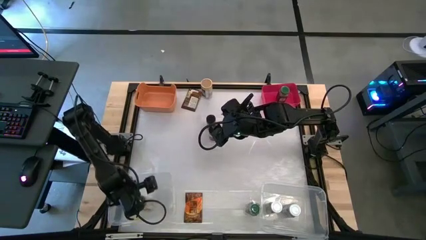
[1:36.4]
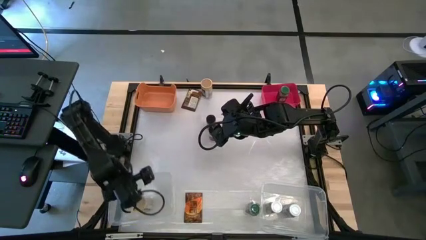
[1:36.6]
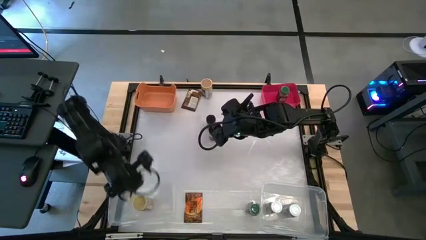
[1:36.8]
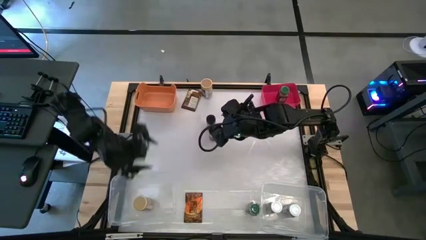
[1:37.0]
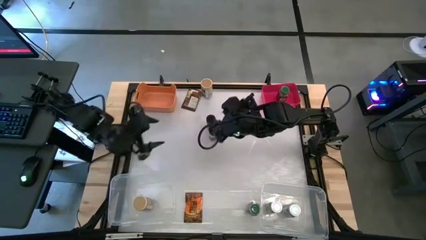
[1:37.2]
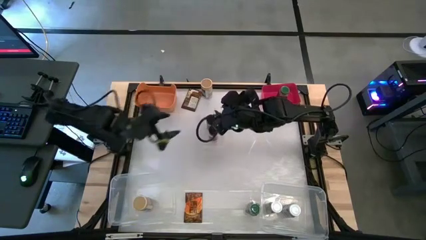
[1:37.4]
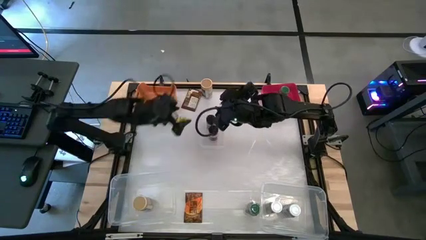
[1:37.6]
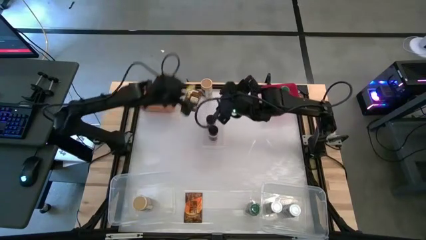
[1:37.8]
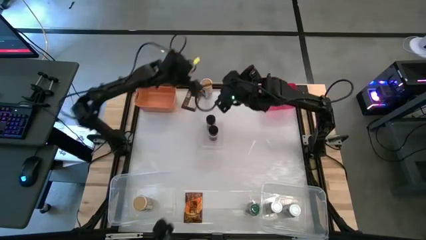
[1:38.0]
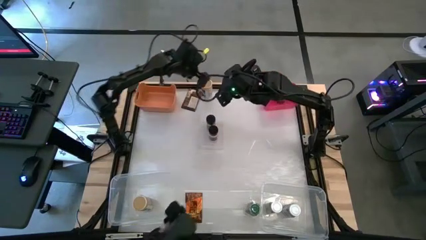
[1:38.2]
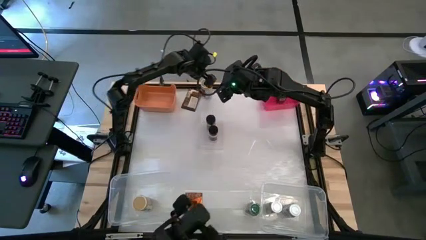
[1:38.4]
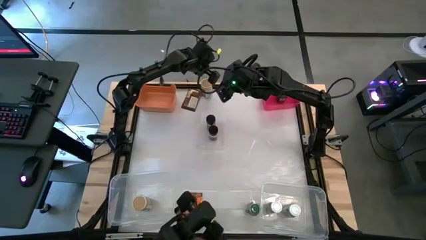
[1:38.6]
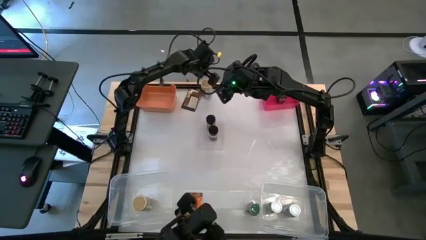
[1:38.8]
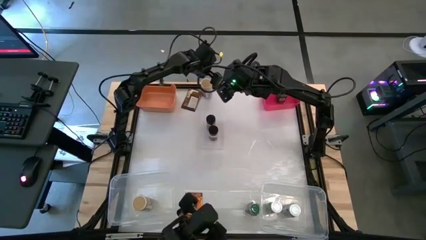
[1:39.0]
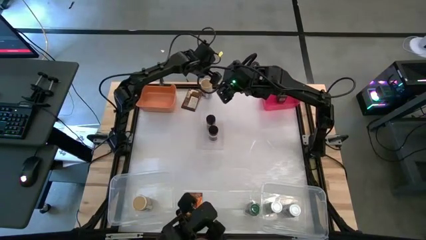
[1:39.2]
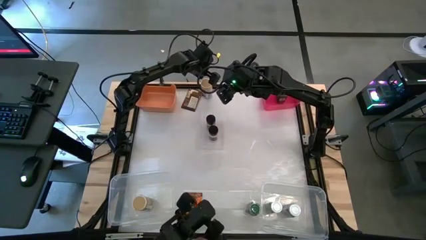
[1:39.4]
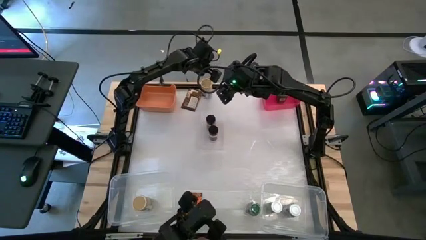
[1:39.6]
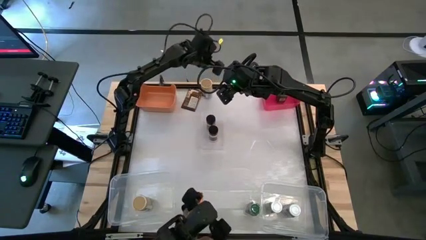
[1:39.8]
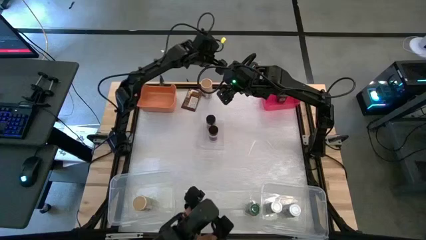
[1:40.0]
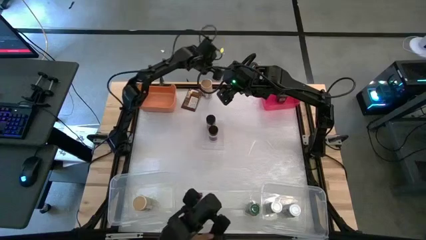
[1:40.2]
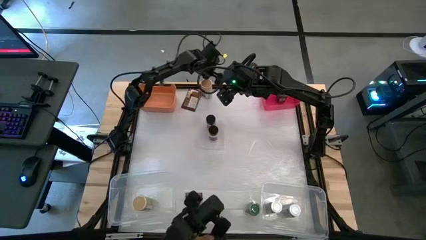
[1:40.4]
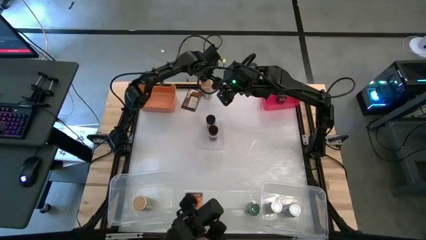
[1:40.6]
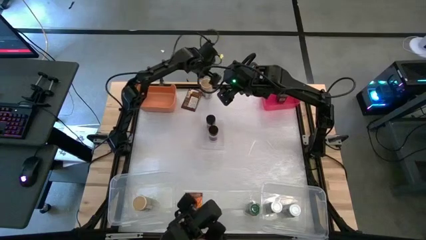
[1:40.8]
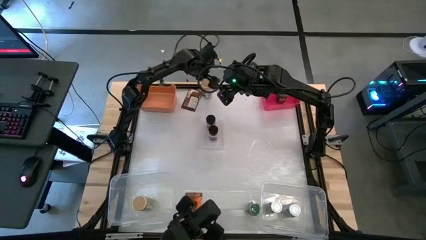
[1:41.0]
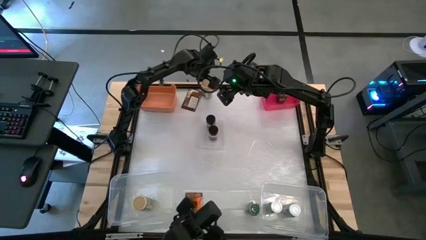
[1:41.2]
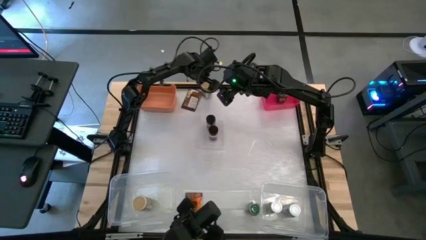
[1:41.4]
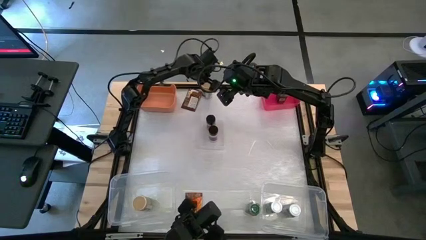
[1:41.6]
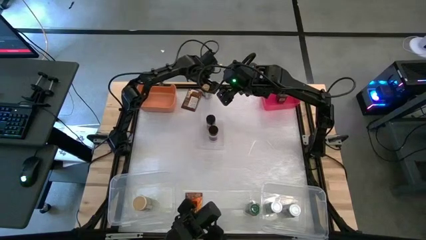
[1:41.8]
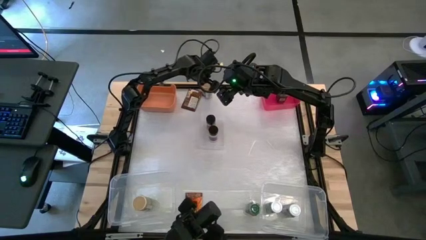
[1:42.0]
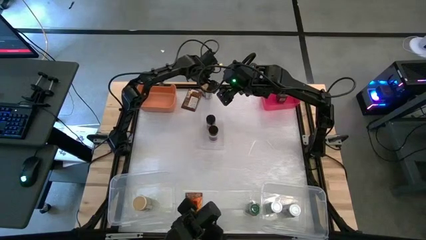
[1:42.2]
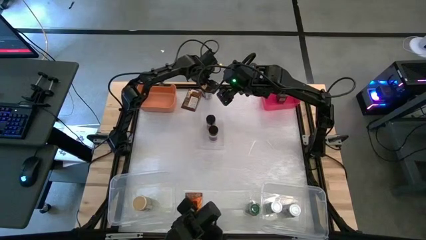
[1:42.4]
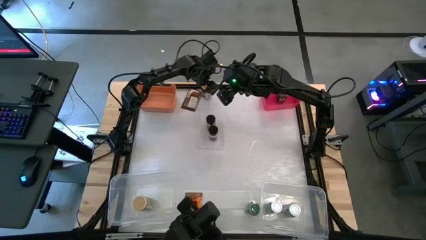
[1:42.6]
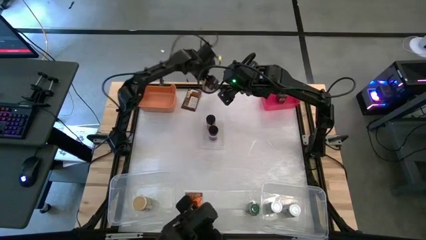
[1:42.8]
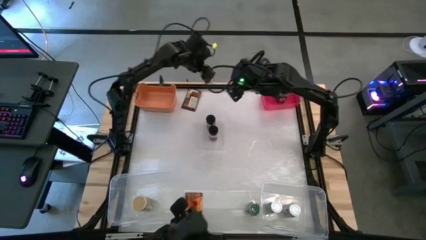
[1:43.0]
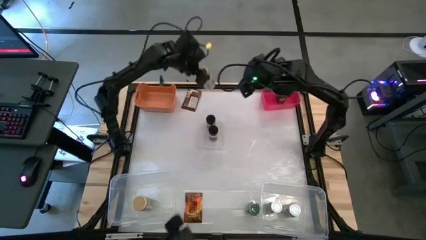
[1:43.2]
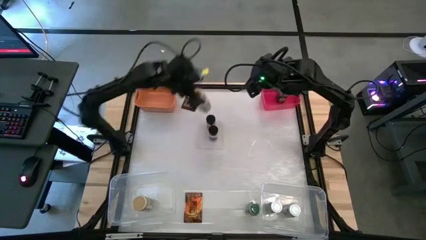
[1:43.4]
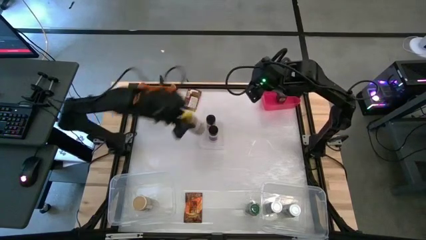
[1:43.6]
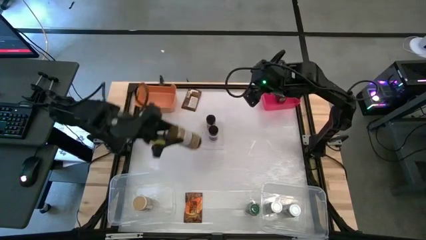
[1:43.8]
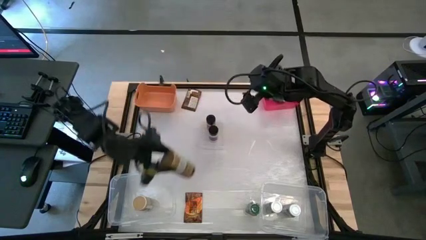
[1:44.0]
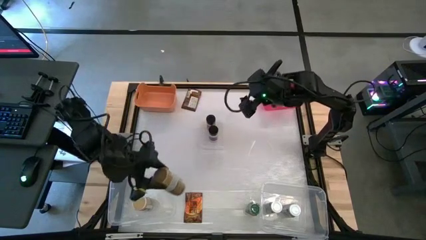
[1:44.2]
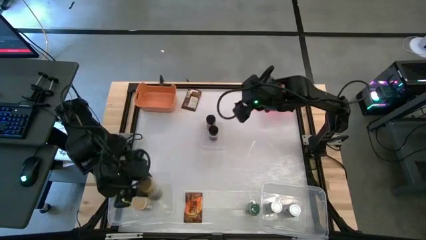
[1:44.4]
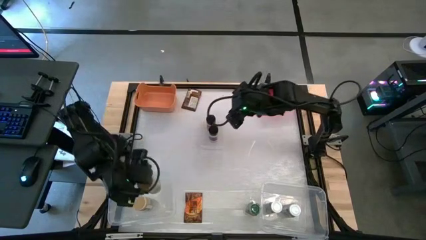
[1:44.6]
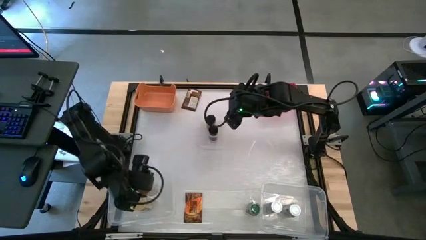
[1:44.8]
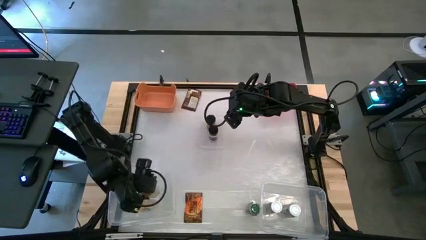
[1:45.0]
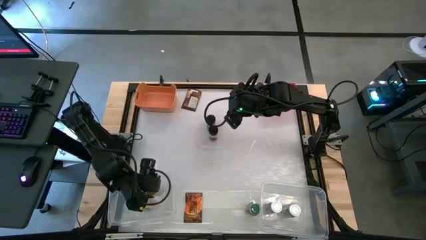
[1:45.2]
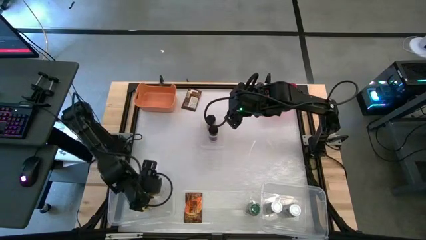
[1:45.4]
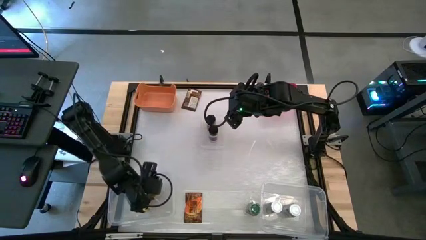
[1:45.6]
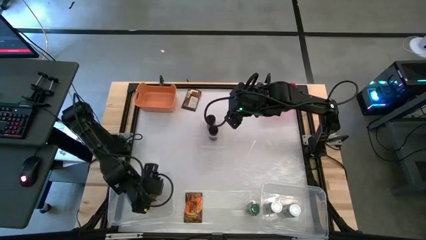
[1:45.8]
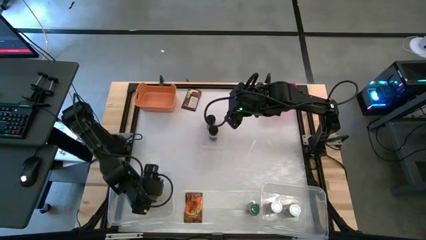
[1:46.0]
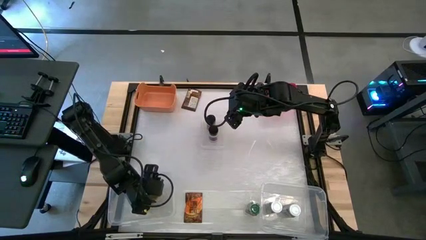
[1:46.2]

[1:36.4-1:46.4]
Task: Sort spices by type
Put the gold seasoning bottle into the left transparent bin

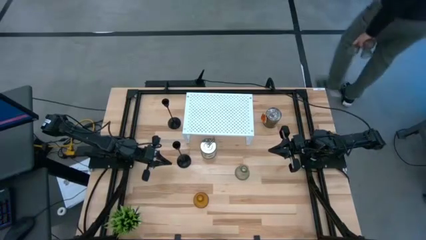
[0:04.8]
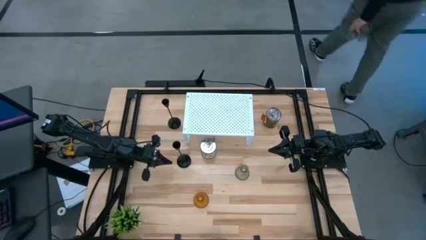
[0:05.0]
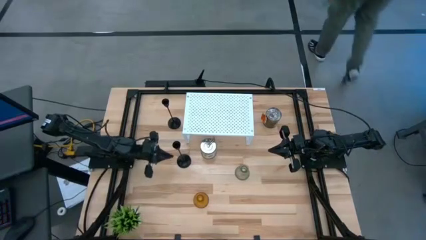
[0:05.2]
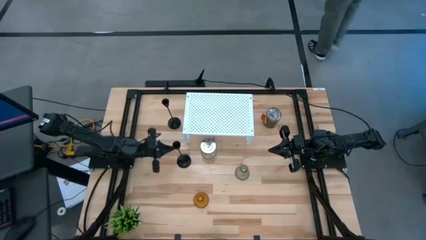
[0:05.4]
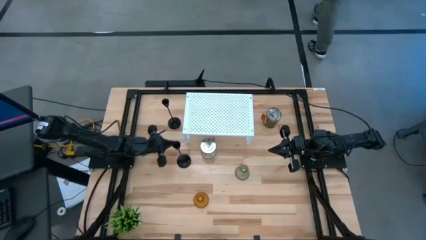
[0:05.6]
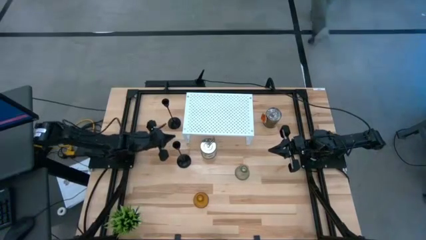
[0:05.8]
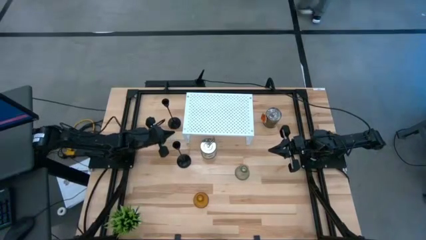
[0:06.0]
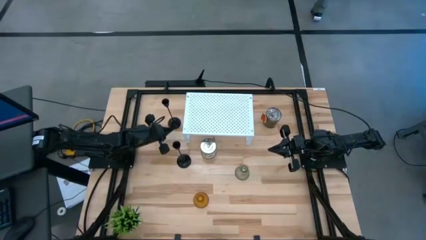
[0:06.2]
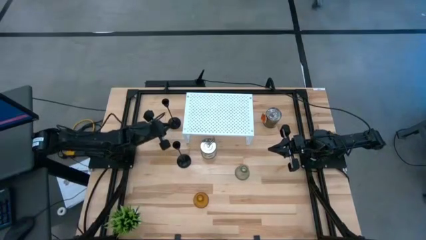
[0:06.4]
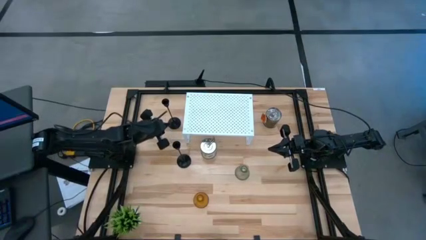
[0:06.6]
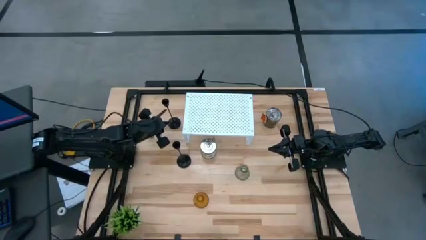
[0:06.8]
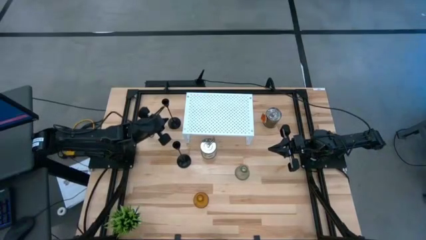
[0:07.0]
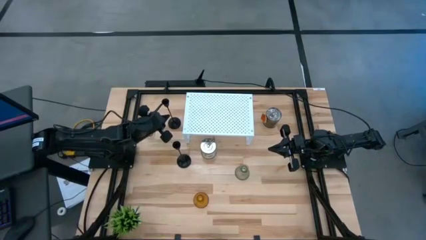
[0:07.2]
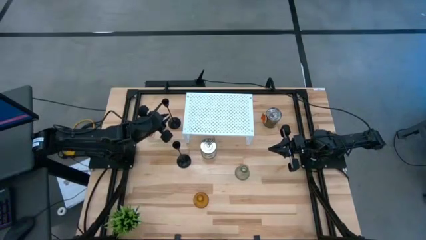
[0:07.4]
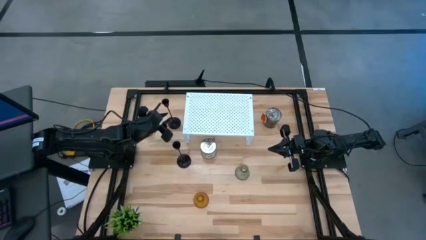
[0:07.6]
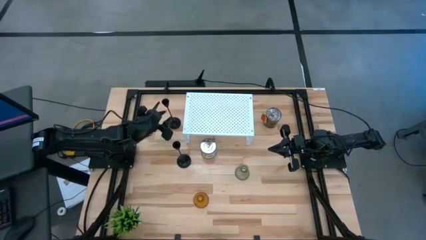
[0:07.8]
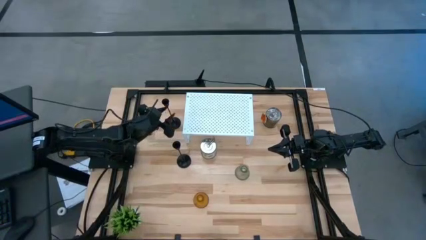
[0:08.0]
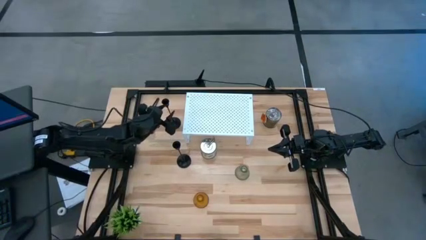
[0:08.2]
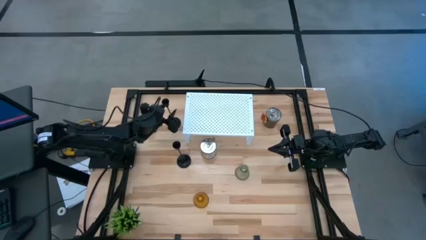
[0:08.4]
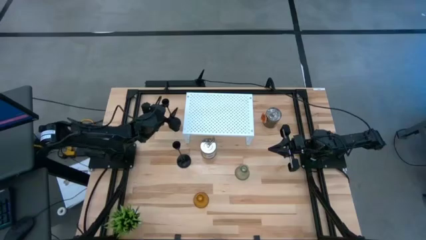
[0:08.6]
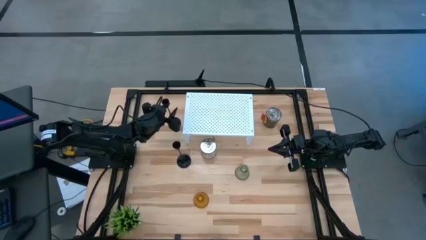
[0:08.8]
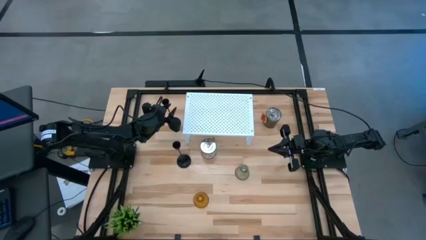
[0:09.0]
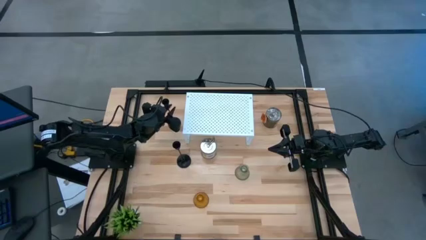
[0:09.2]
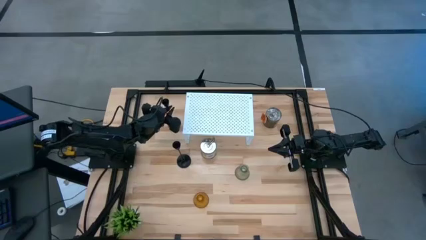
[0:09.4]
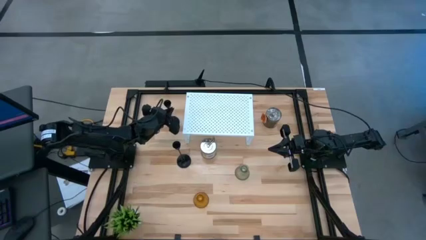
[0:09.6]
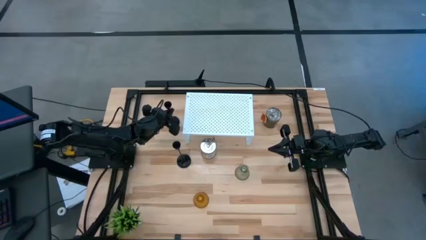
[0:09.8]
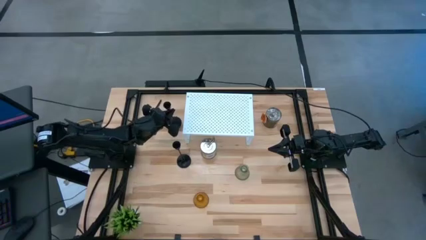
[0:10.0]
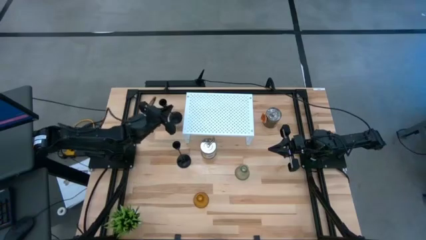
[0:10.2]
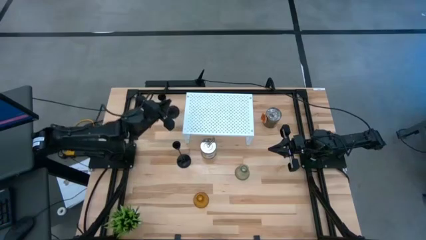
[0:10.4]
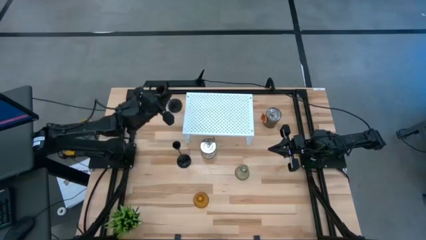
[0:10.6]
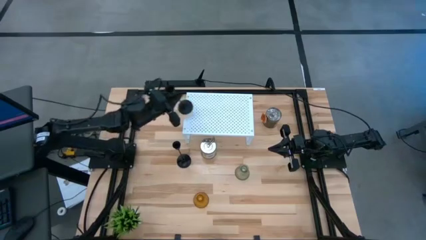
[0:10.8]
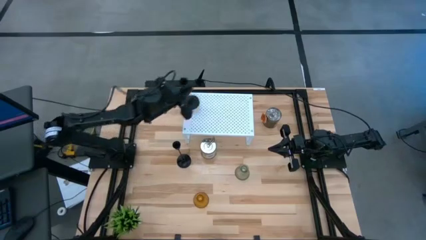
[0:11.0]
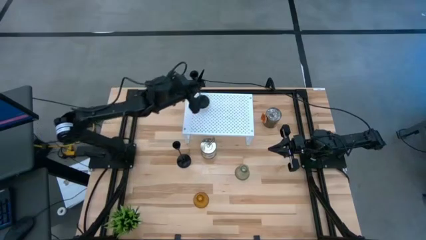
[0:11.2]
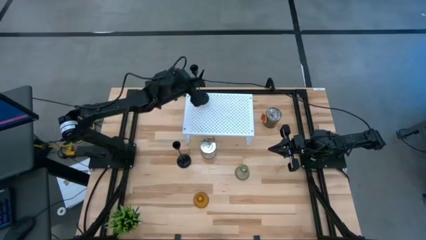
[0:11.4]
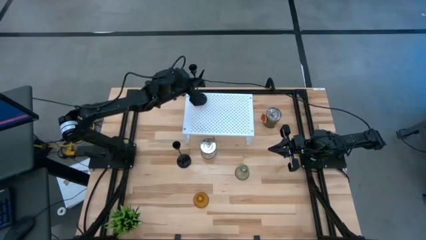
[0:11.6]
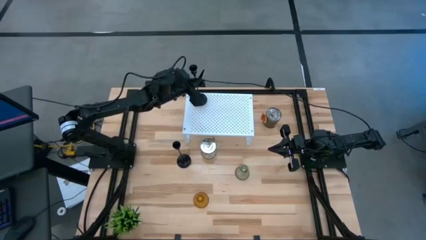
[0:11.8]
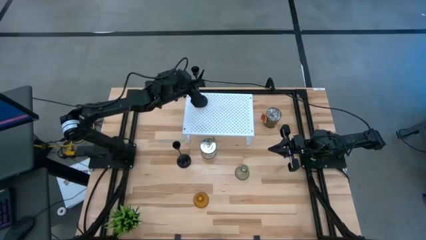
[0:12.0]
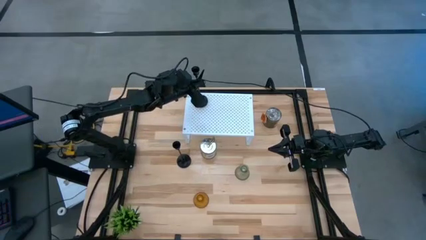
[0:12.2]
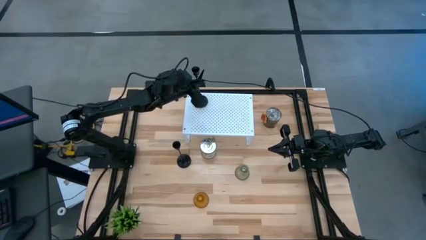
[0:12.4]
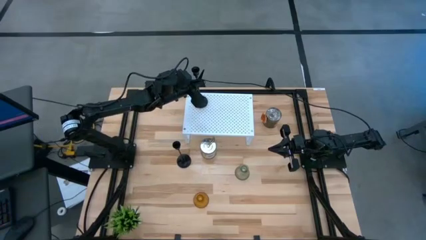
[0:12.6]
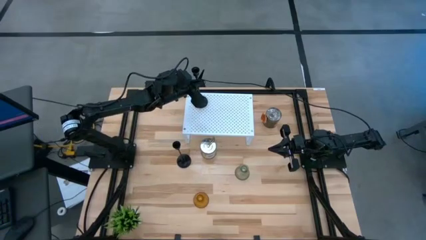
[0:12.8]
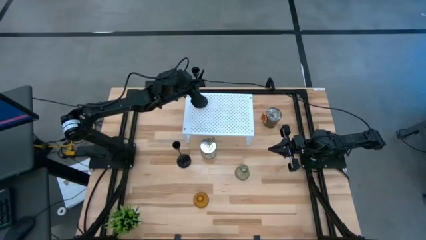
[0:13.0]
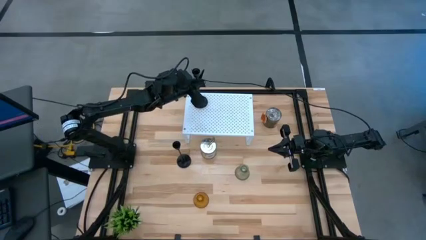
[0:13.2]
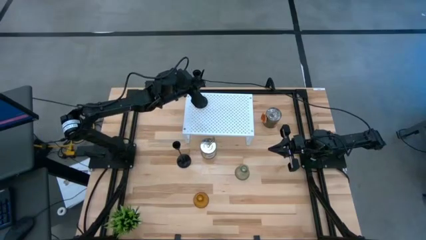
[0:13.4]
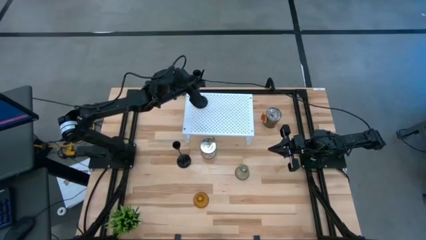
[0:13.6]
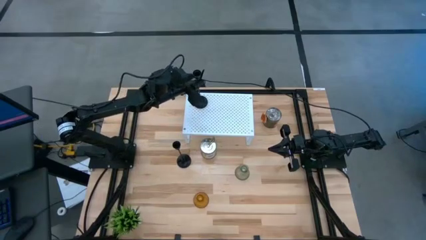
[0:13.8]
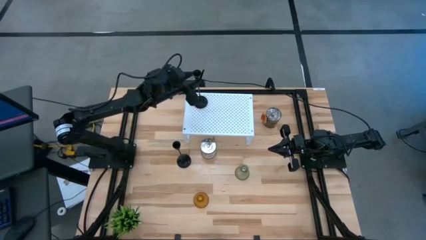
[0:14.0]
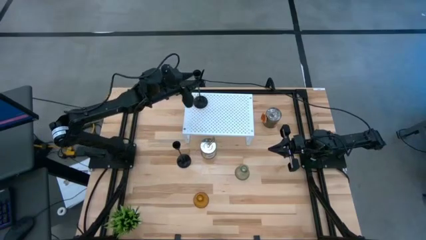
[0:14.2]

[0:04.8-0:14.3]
Task: Pick & Place candle stick holders
Put the top black candle holder on the shelf
